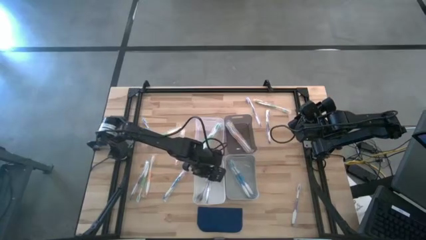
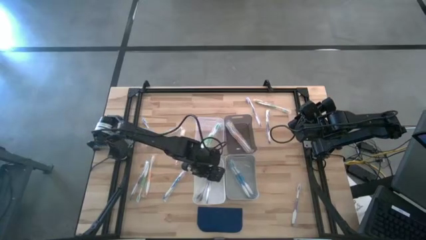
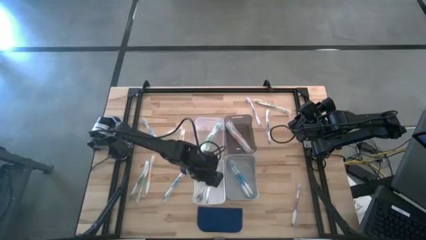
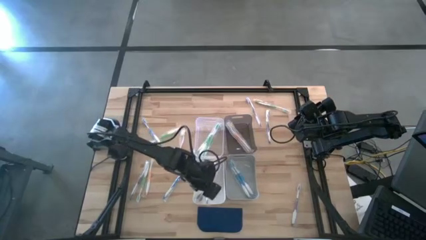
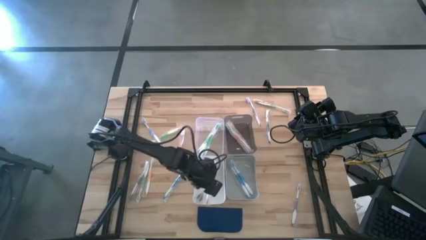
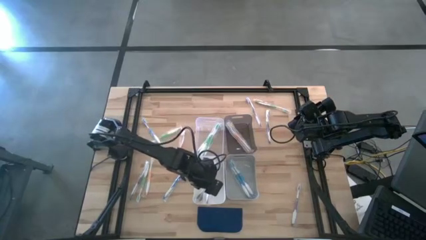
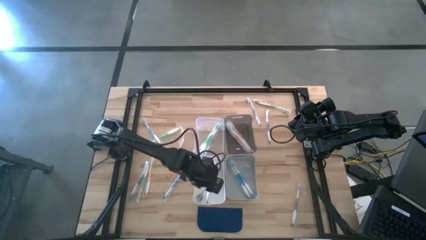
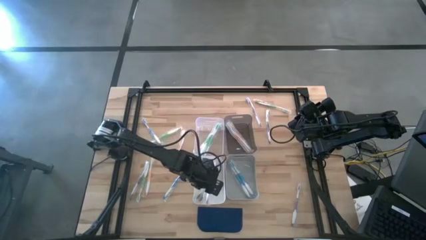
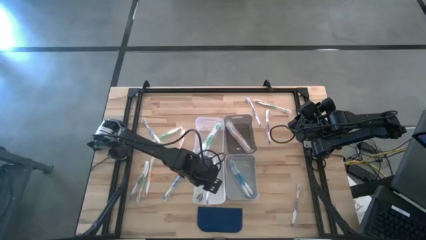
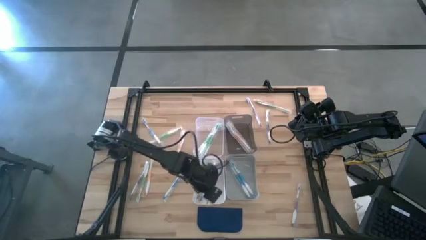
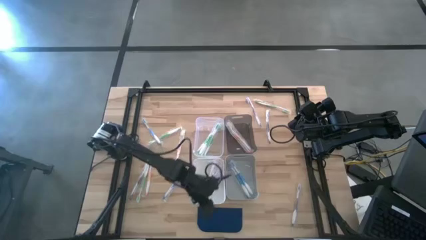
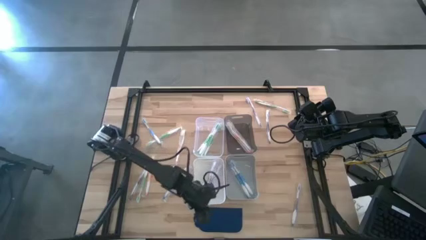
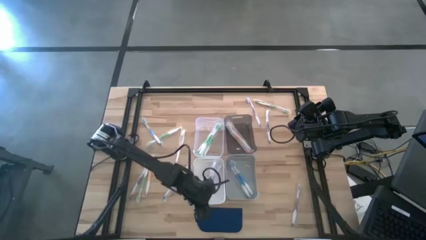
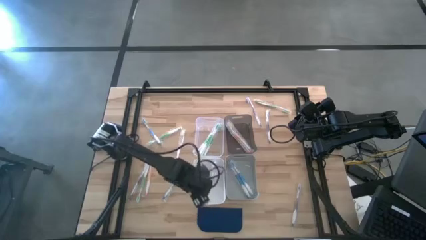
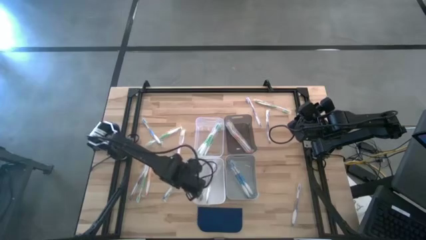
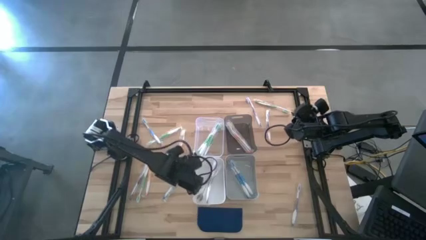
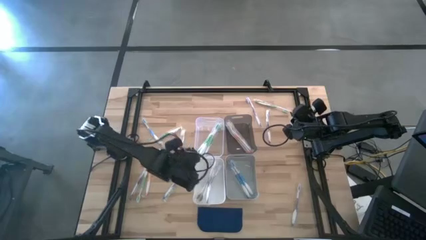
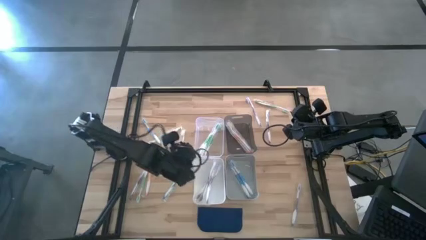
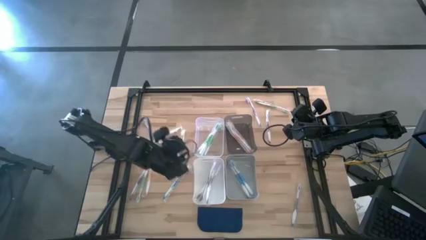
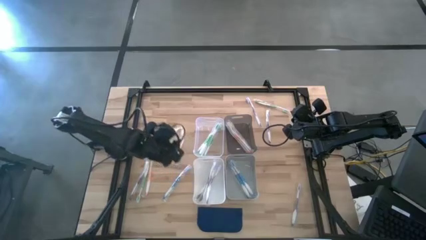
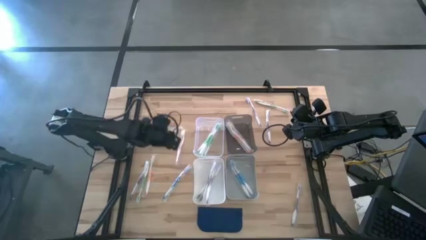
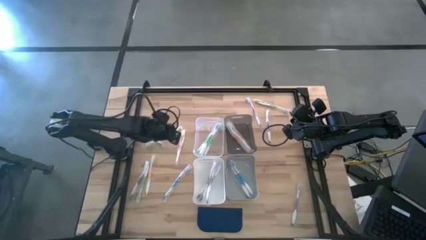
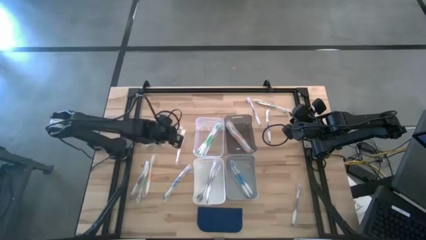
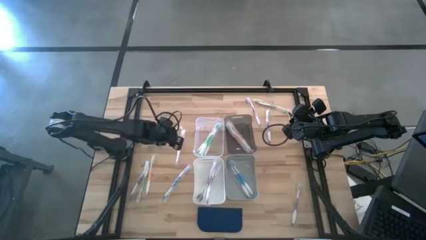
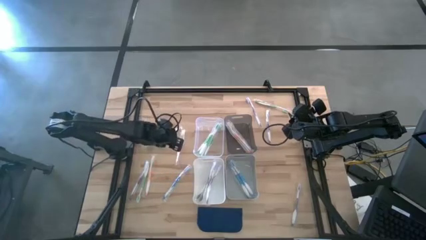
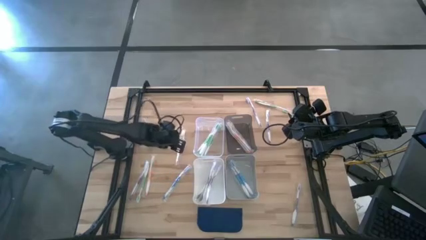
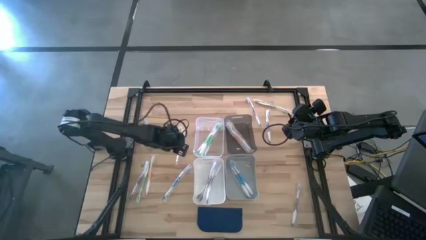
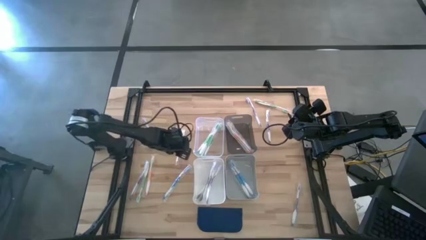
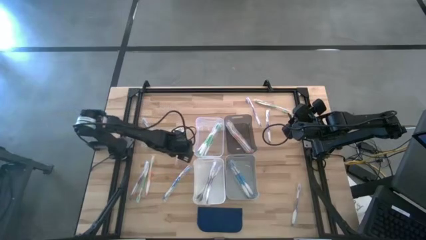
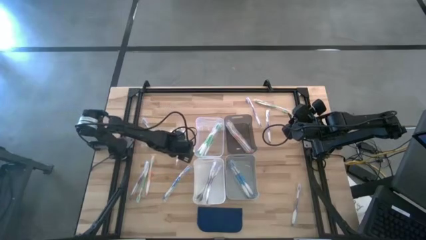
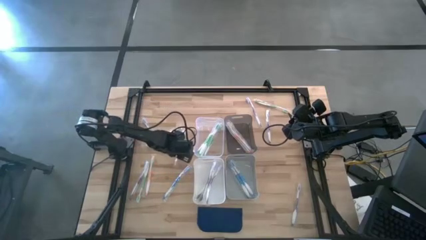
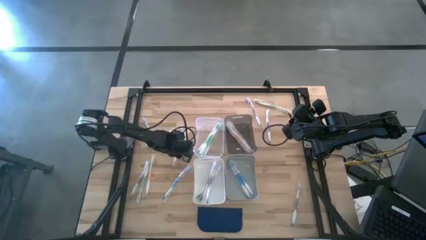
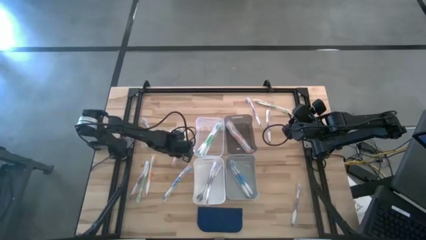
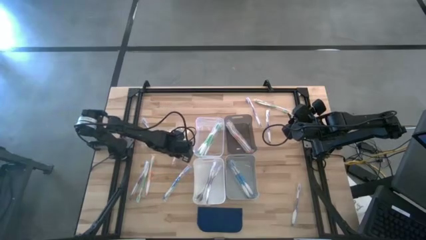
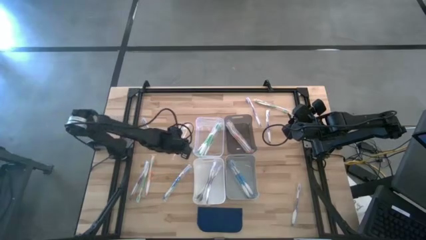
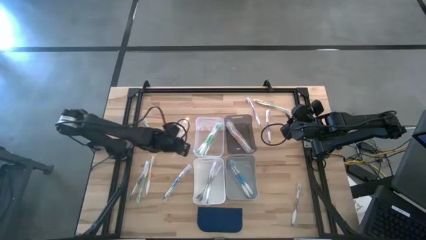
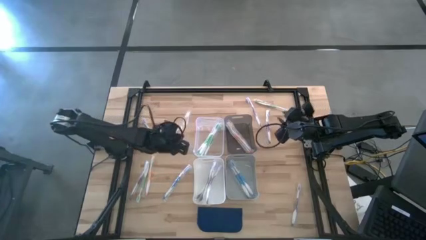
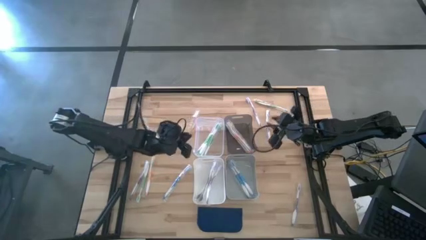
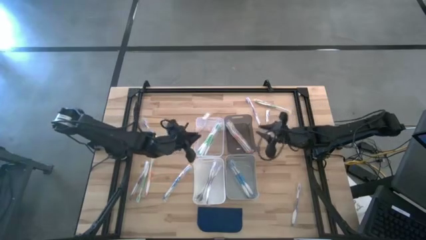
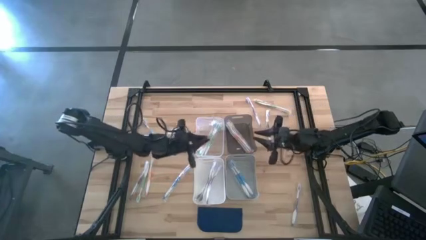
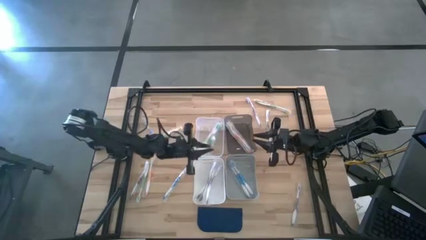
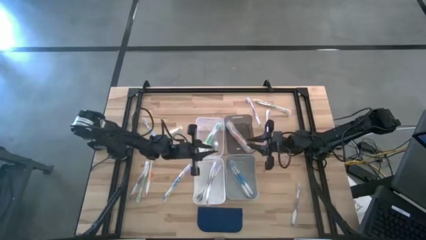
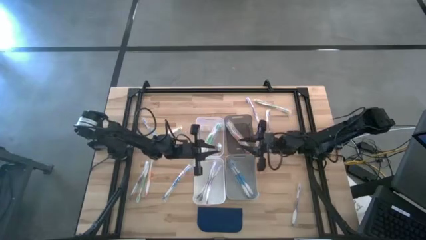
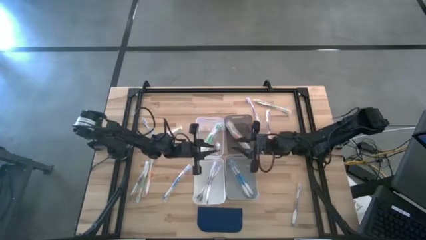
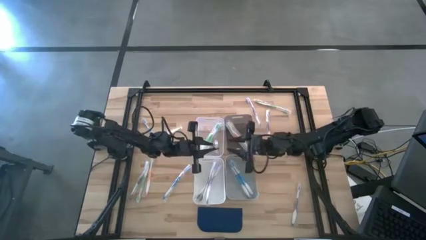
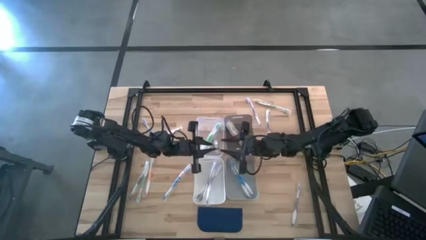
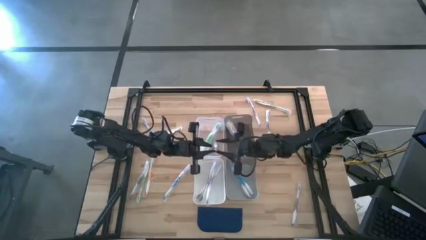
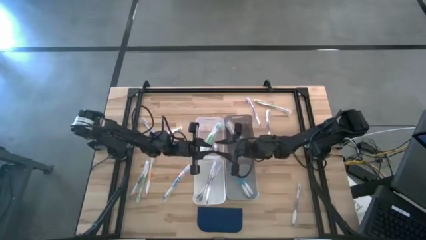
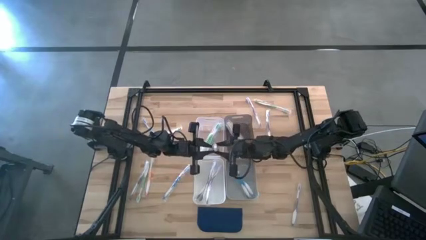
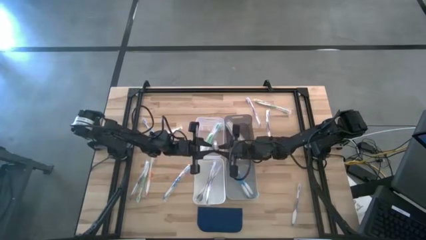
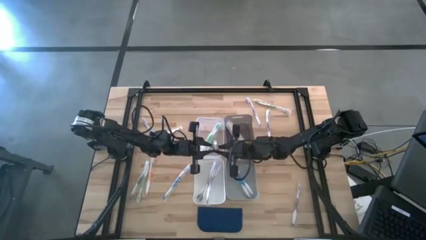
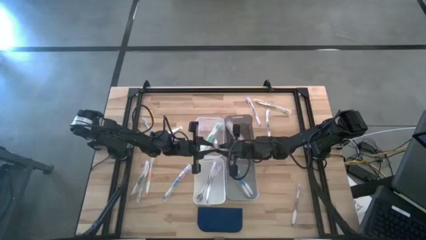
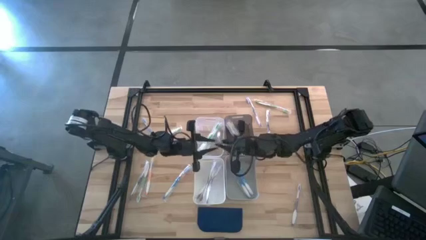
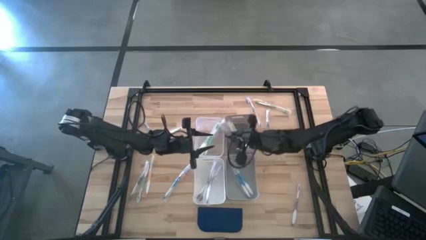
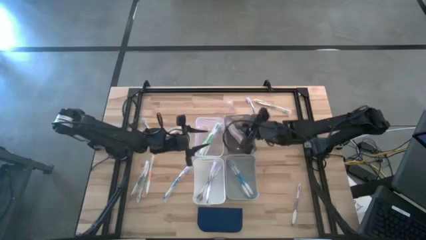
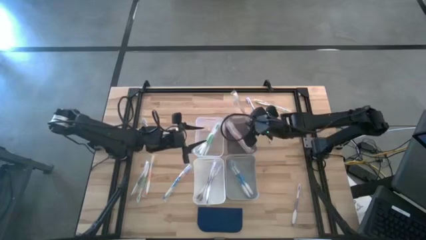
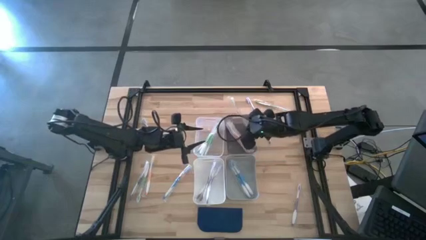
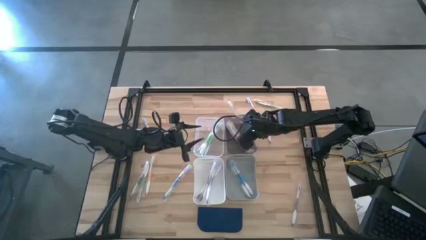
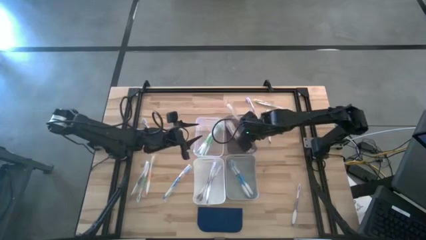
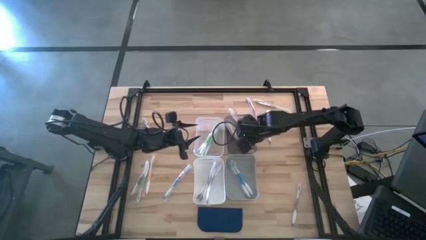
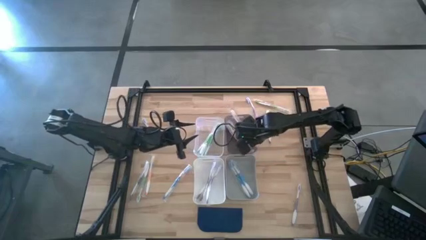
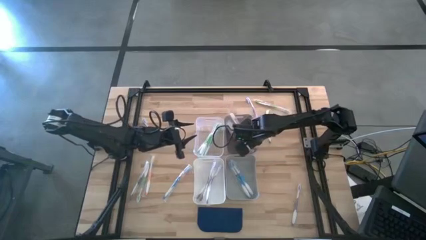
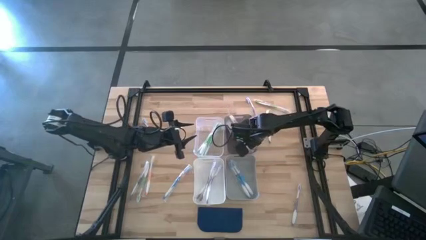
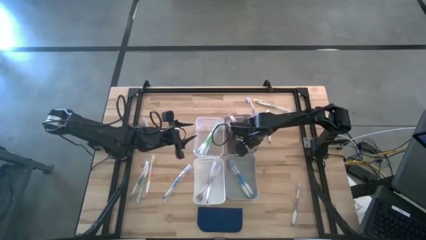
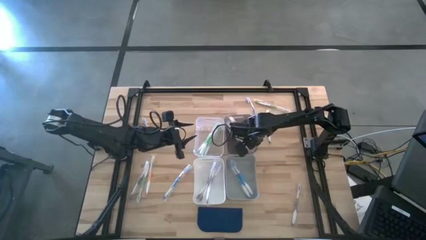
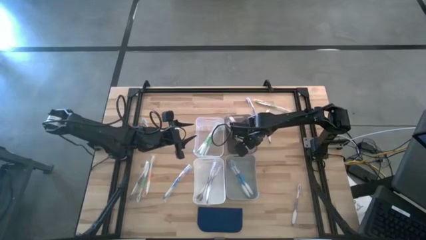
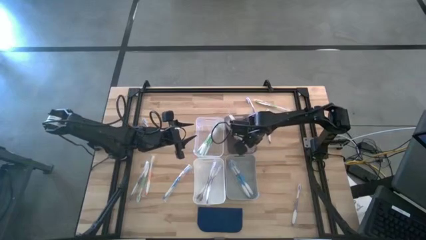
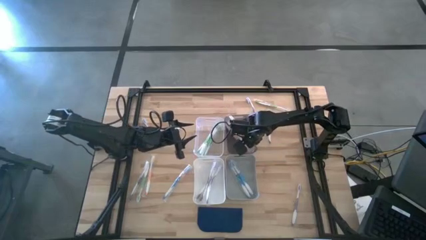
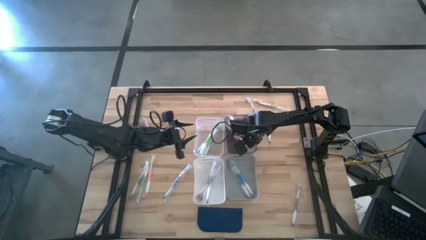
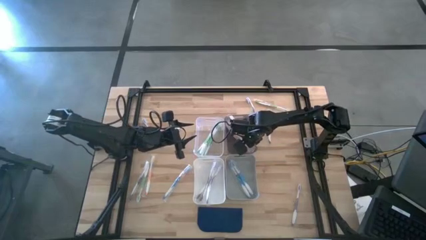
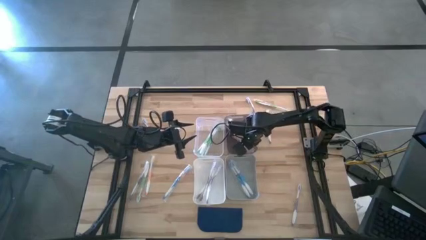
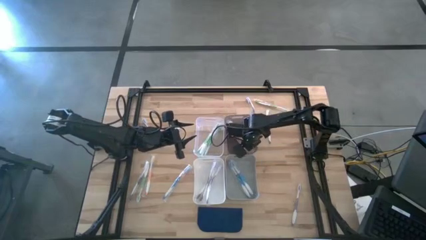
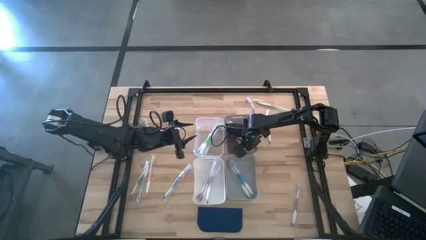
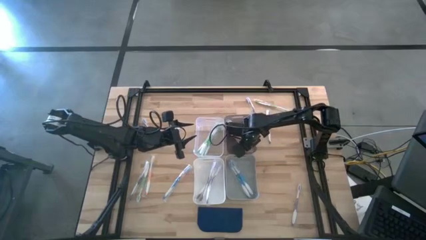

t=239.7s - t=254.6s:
Task: Pick & Place Toothbrushes
Put the orange toothbrush into the black bin

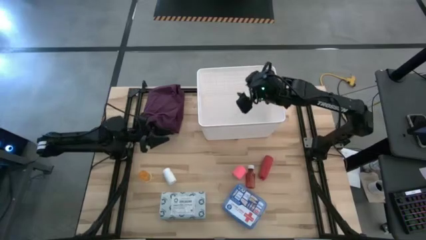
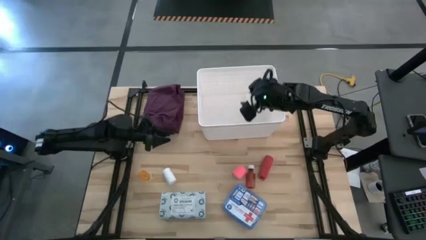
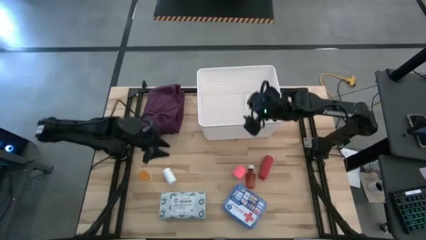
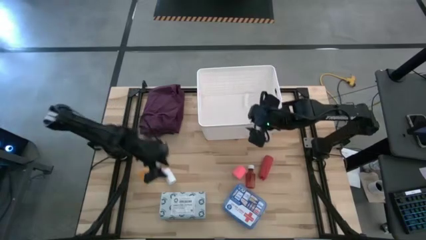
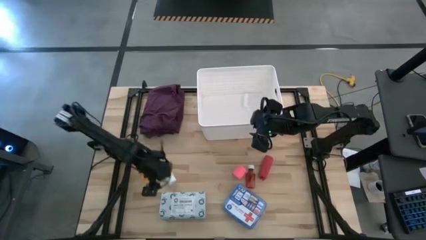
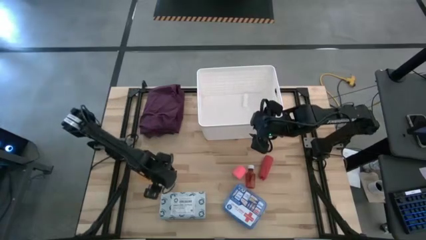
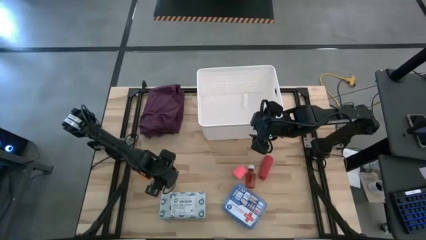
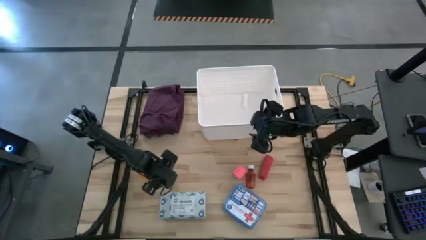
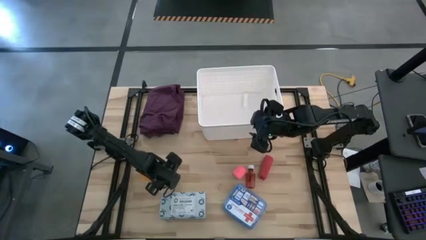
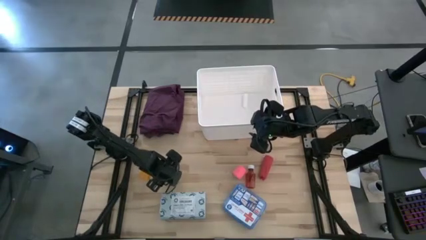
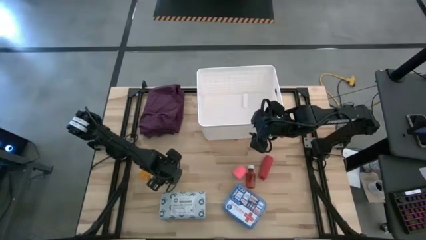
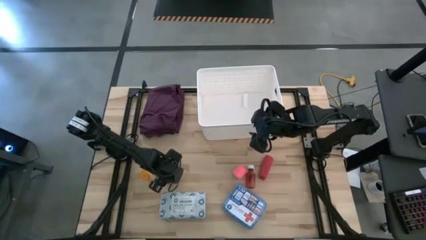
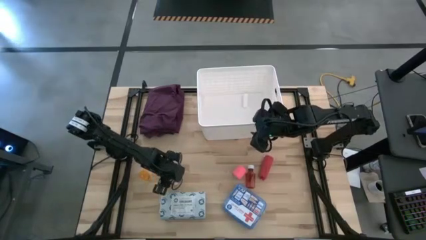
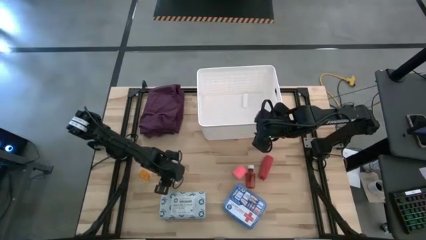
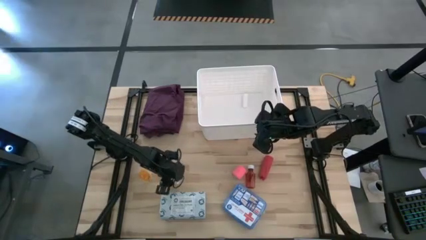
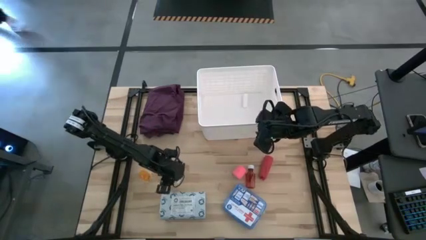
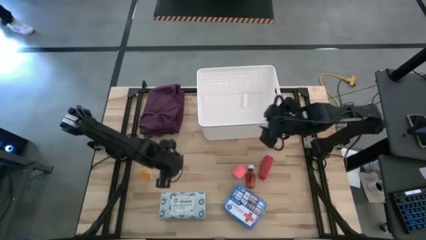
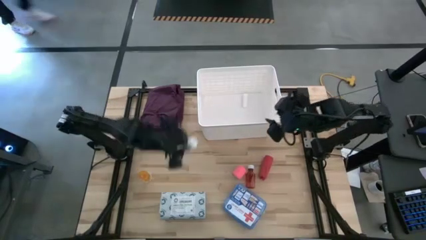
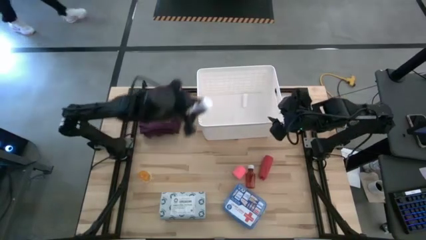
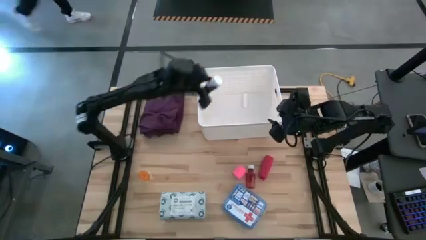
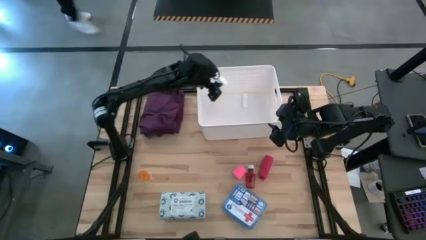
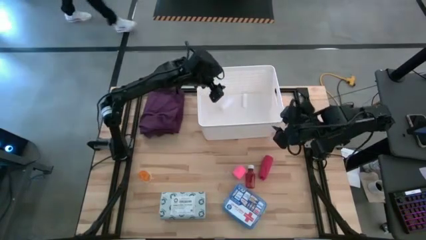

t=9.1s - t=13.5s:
Task: Pick & place medical supplies in basket/bin
Put the medicine bottle into the bin
